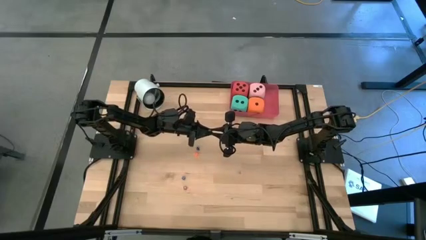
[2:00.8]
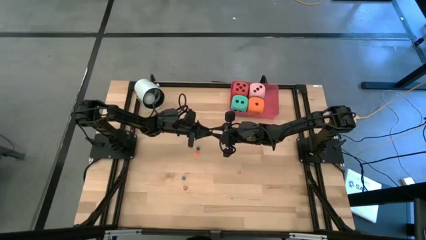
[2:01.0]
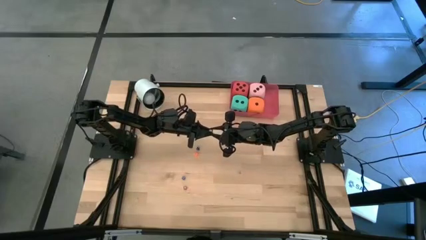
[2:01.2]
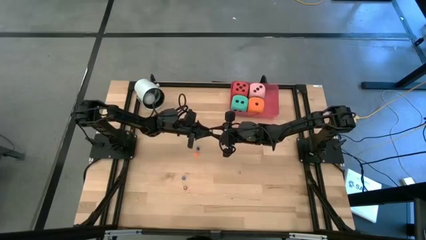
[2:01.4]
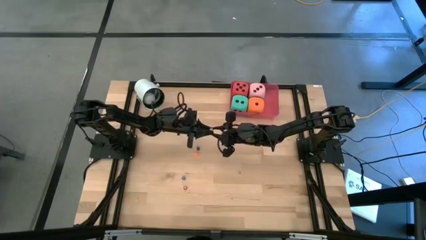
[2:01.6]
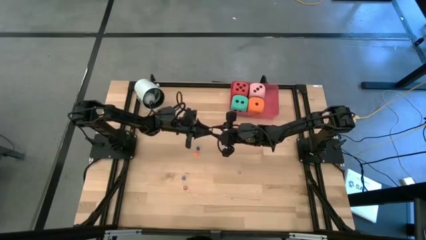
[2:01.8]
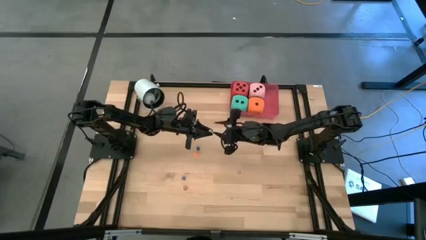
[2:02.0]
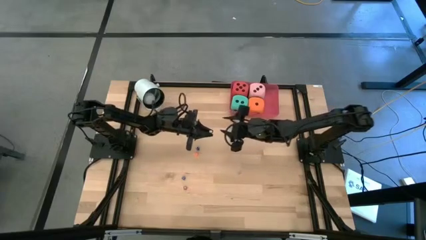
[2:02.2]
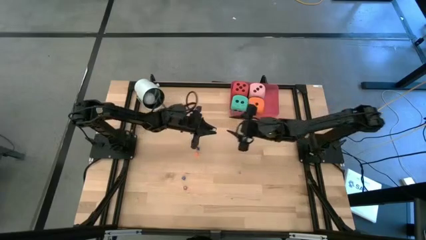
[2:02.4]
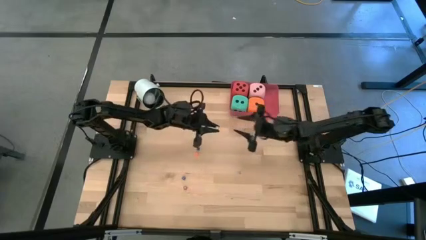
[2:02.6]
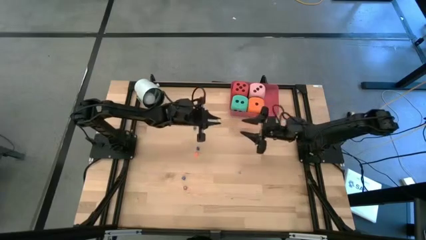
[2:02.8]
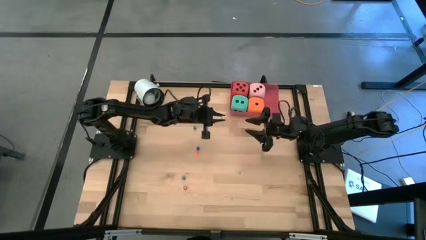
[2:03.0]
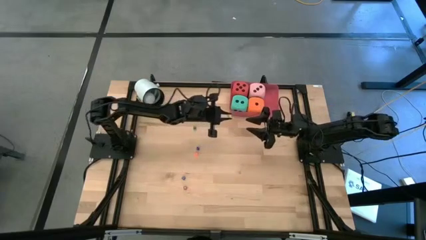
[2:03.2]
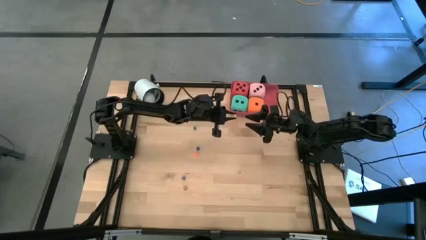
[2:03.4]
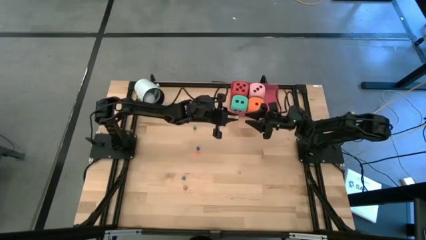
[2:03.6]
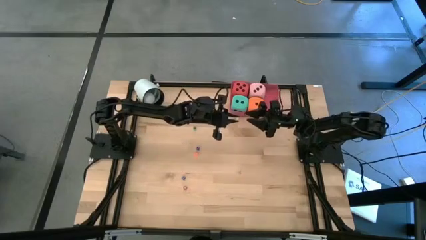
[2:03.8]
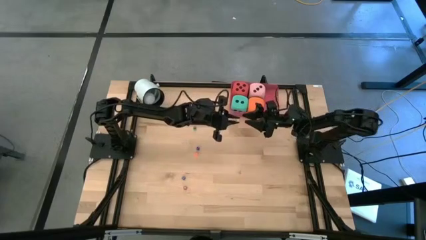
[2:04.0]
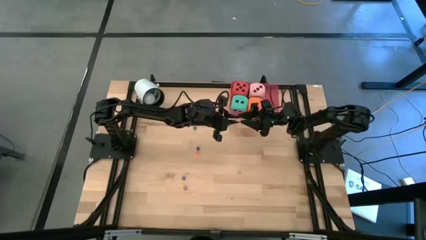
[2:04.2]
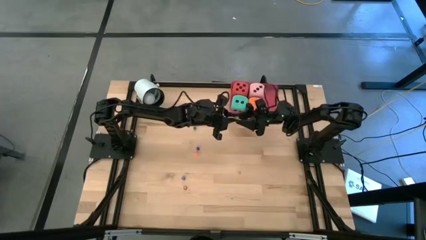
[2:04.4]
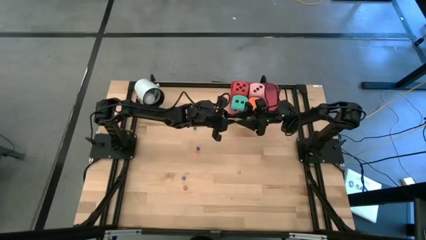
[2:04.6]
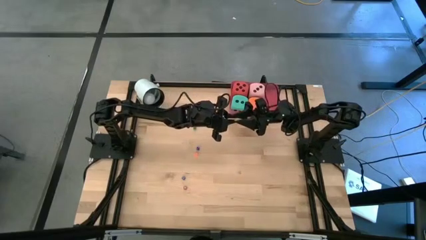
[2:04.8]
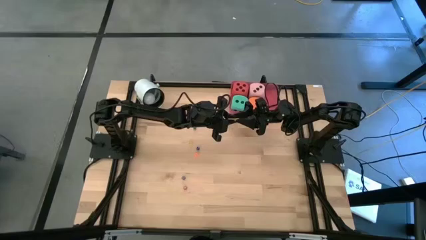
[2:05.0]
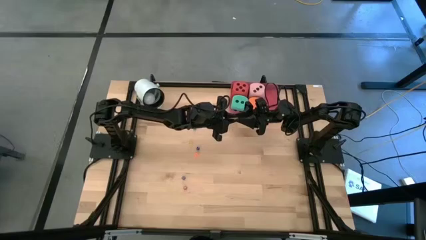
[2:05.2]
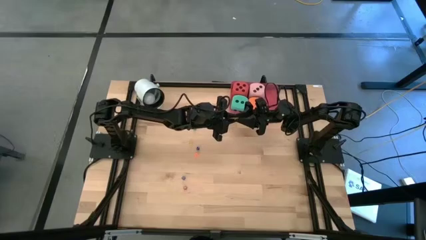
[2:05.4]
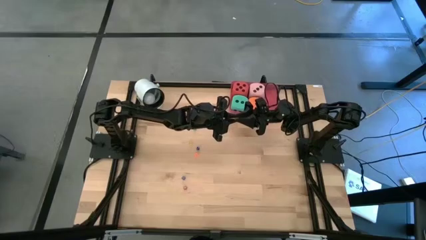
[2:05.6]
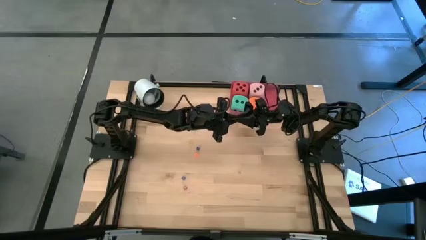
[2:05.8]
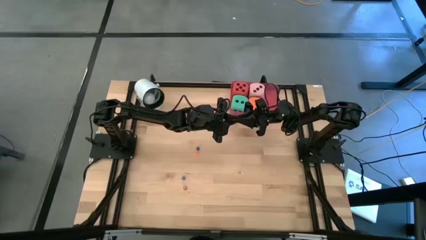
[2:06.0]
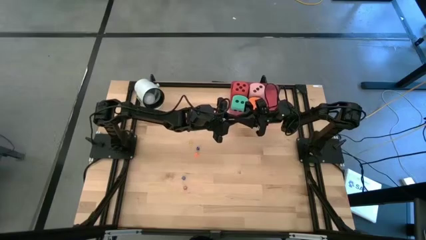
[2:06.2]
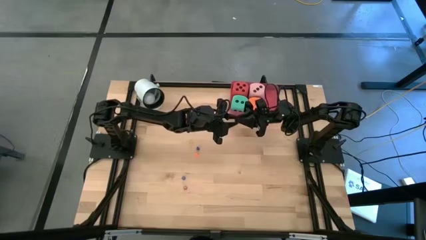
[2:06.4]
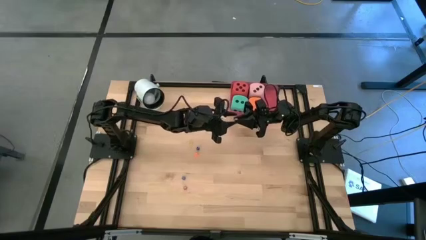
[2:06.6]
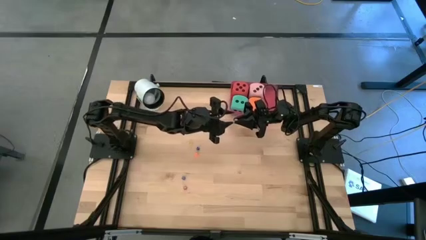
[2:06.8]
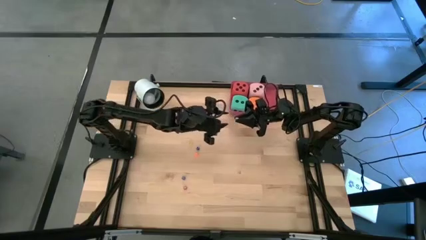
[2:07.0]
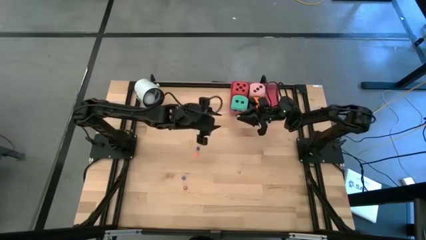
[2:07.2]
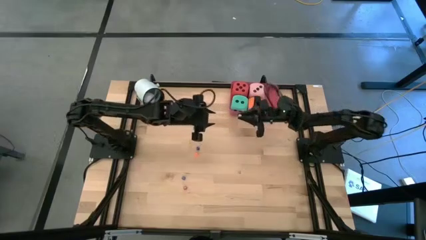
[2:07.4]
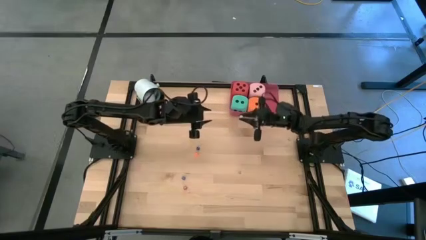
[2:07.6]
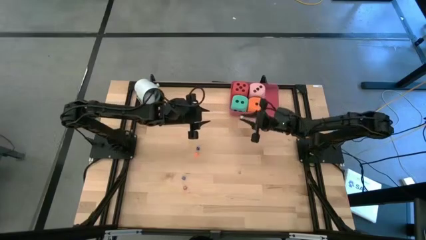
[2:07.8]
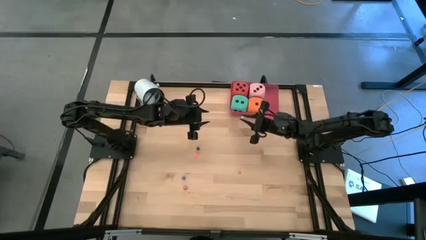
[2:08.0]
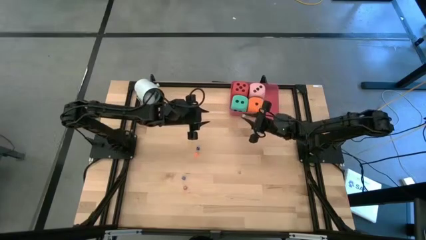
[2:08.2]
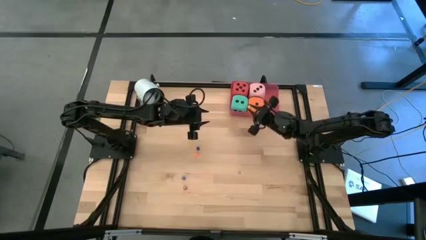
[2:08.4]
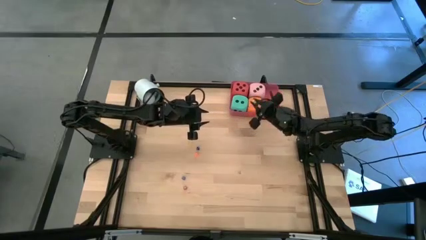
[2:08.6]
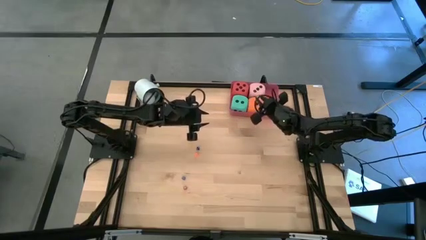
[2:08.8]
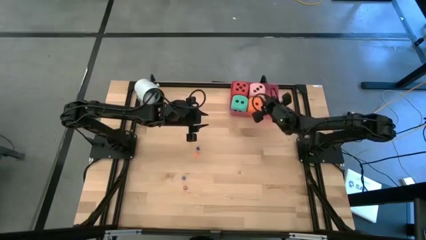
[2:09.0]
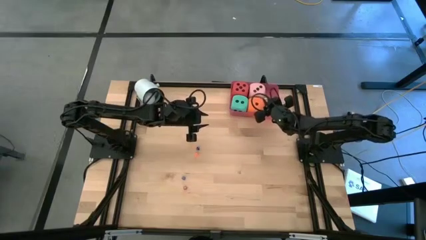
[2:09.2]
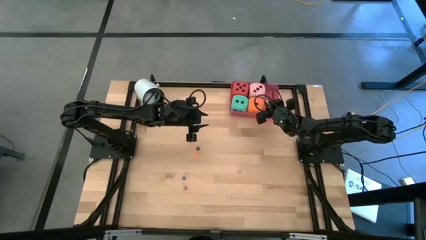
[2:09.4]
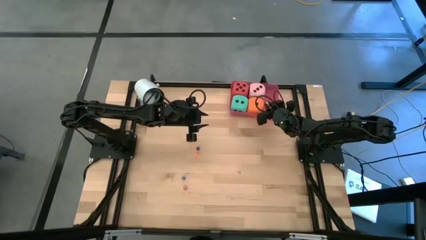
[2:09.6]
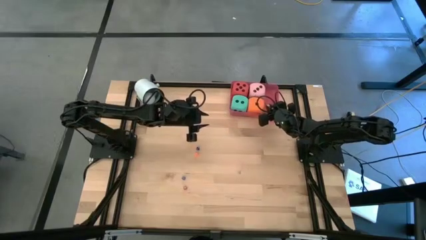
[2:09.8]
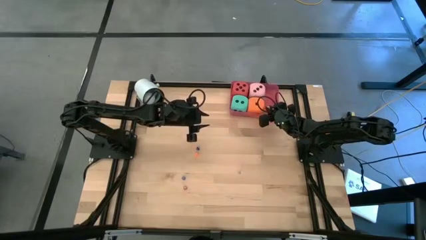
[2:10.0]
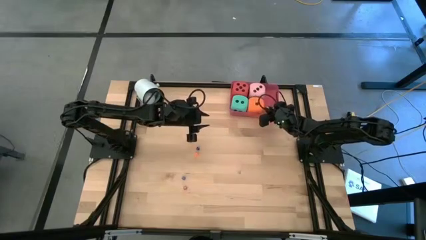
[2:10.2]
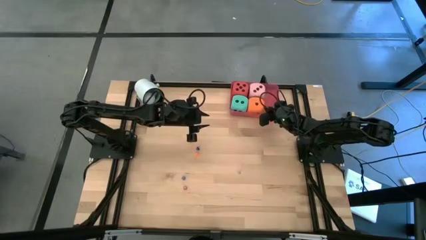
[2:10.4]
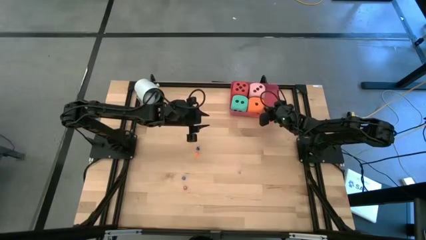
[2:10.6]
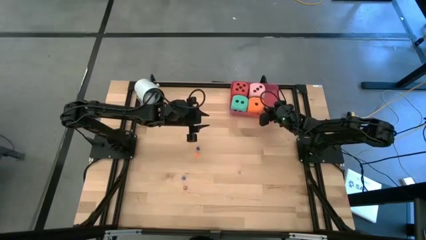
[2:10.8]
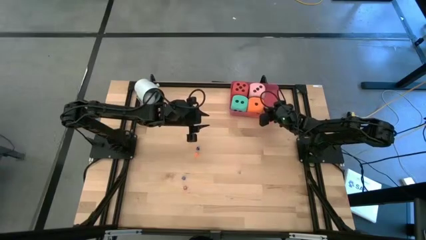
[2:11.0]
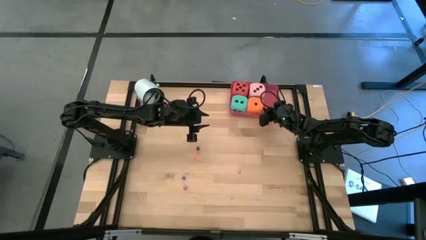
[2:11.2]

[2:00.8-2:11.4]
Task: Pick & Place Dice
Put the small light green dice into the red bin
